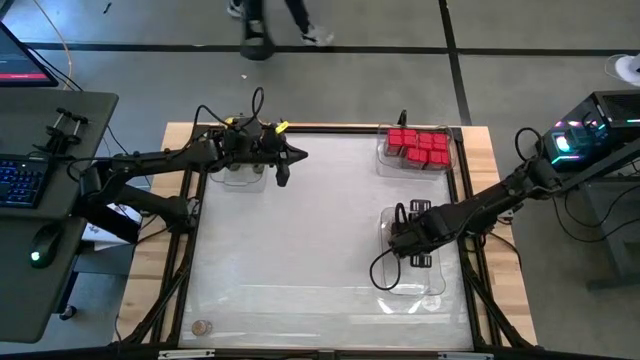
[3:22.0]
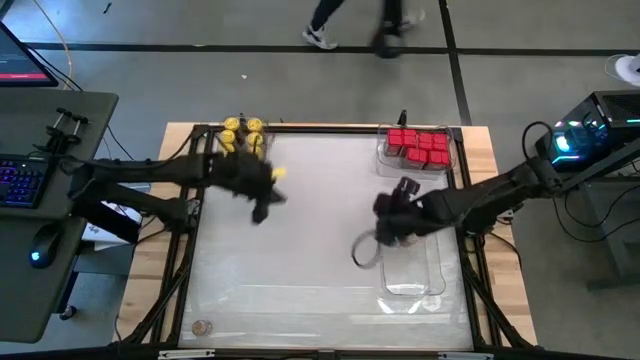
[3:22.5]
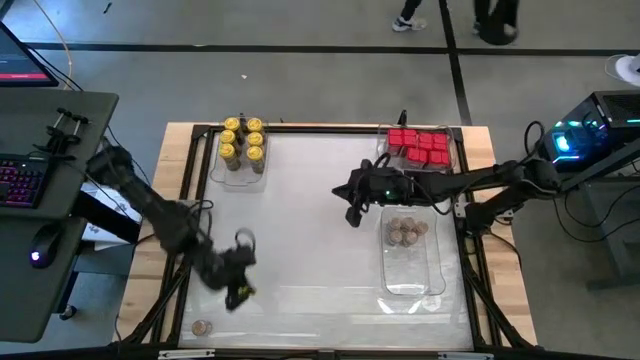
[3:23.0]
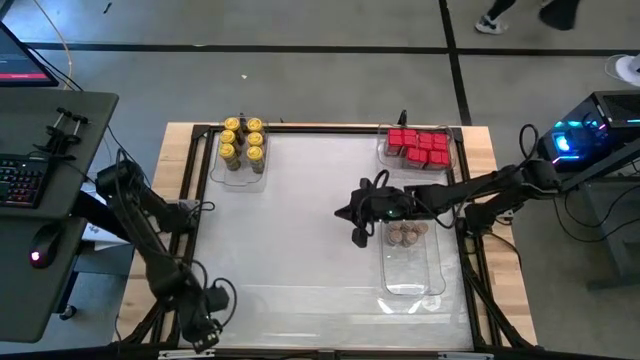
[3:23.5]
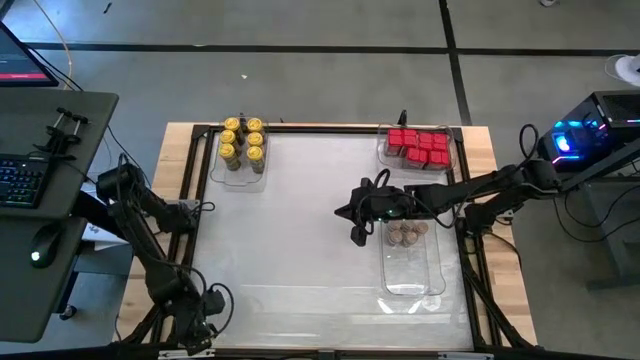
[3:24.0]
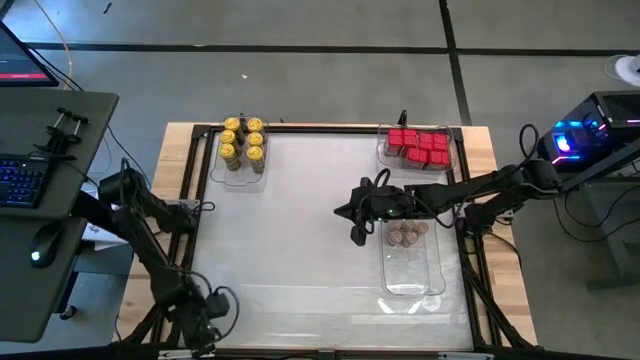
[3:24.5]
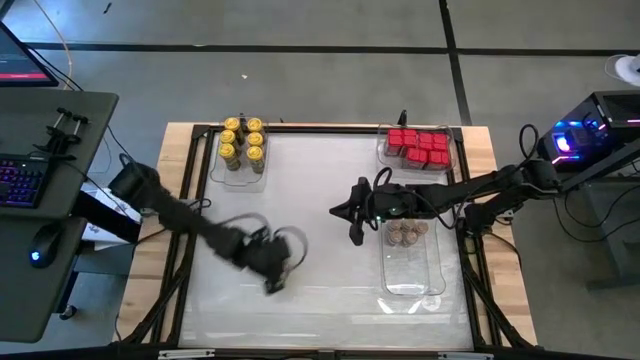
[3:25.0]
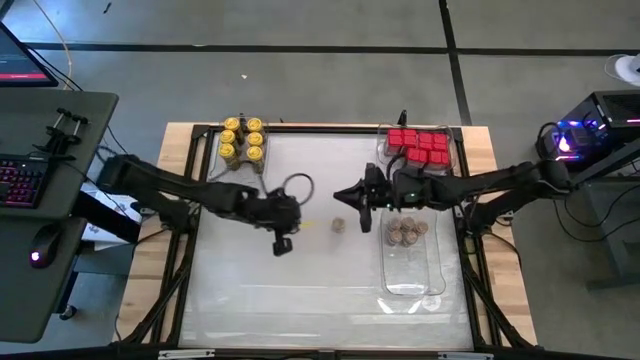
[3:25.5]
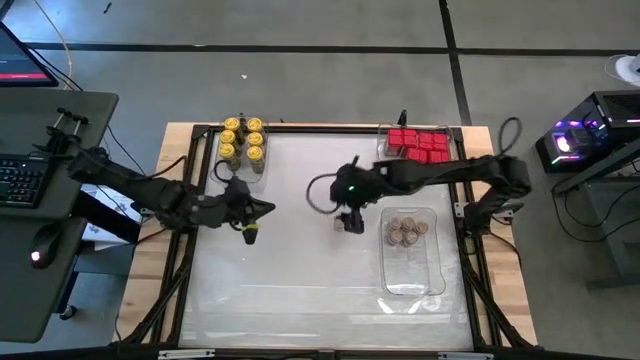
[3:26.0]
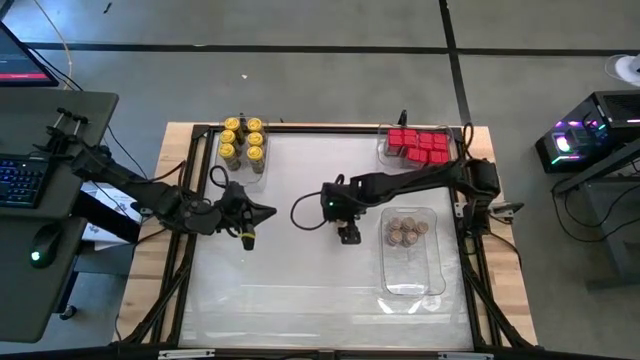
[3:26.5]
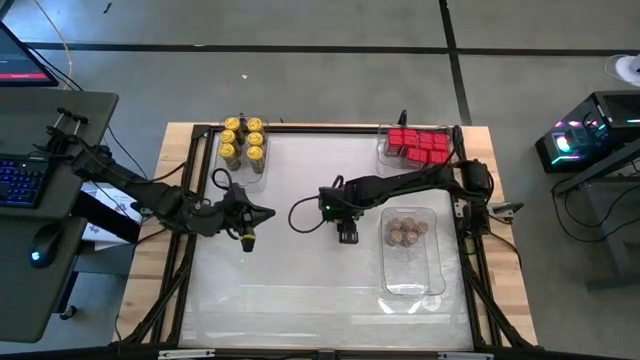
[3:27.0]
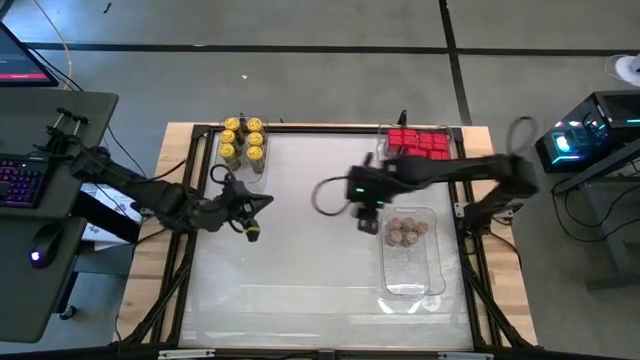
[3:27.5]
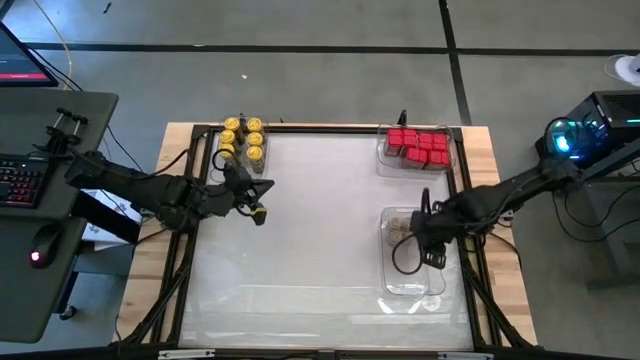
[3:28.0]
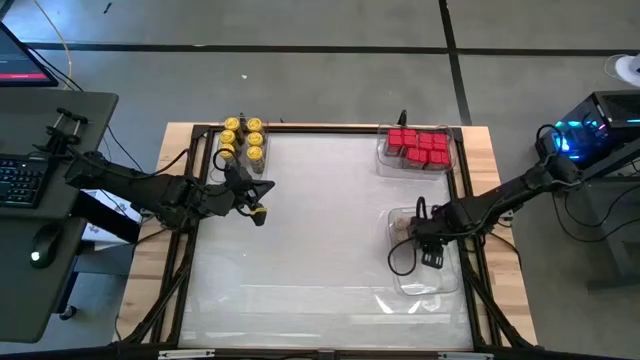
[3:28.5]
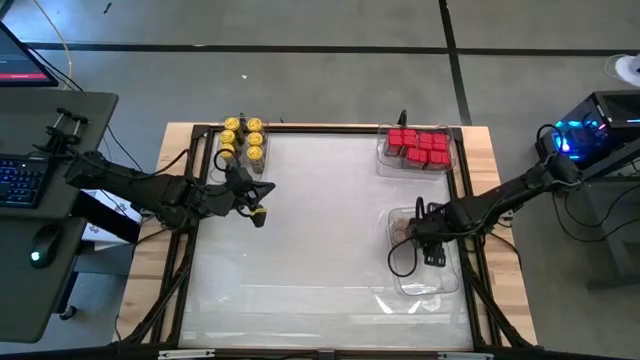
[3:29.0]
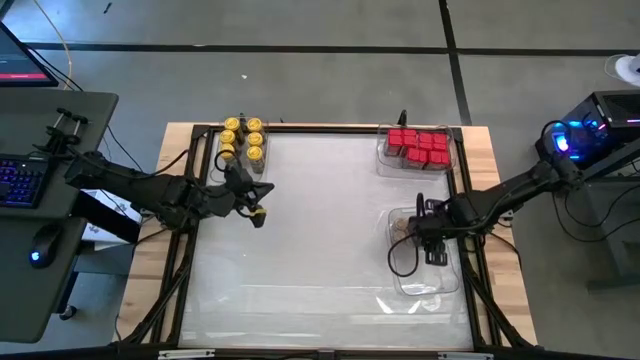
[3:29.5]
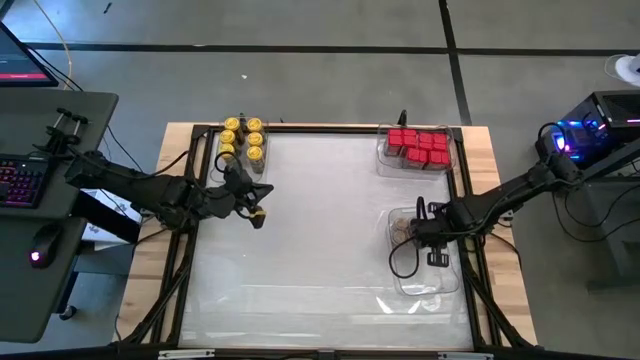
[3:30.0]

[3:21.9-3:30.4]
Task: Sort spices by type
Put the brown seasoning bottle into the bottom transparent bin

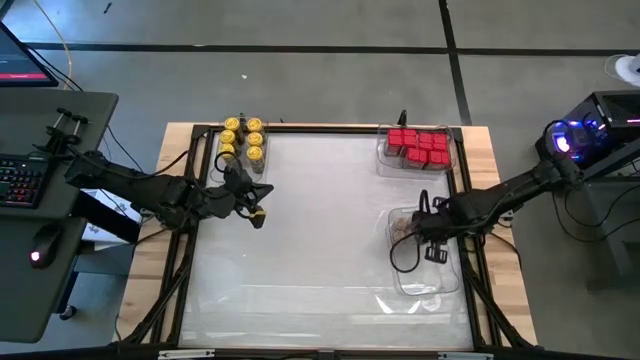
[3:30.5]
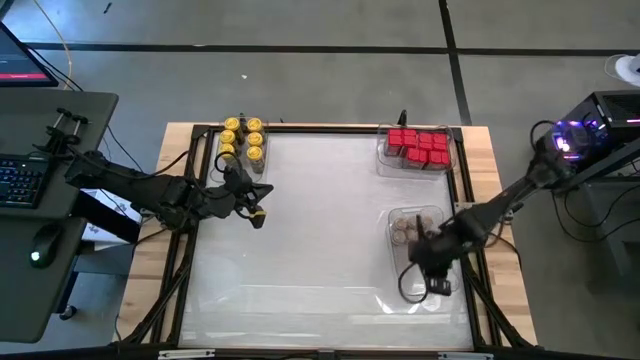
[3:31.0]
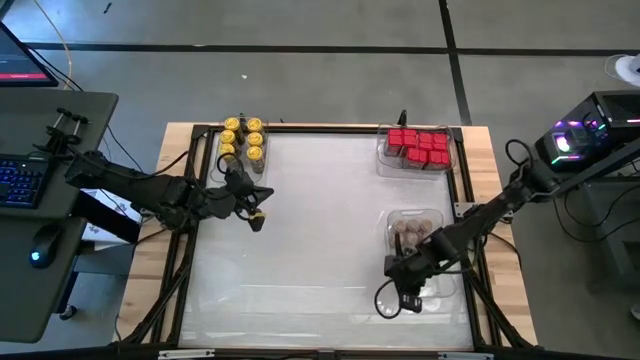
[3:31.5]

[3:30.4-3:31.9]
Adjust the bottom transparent bin

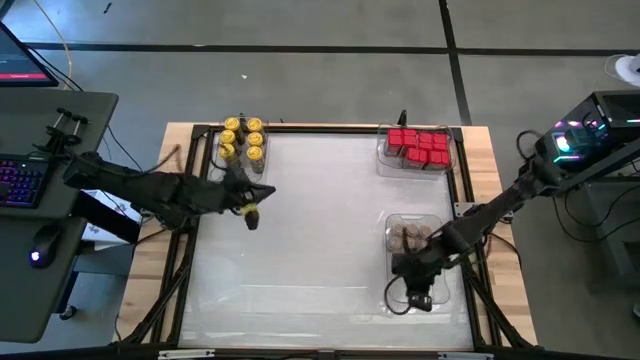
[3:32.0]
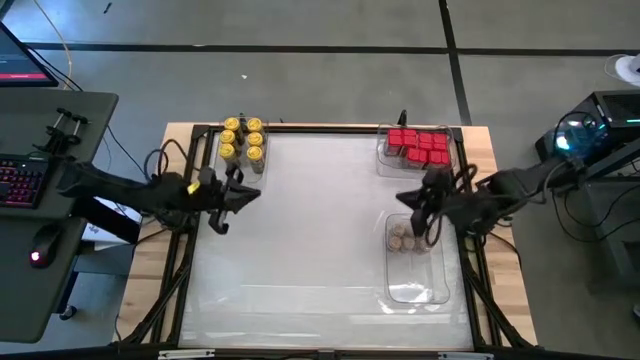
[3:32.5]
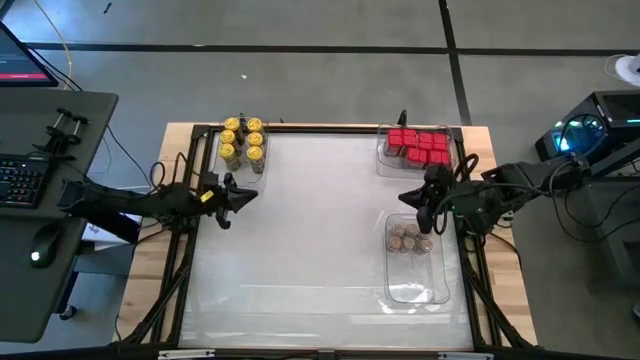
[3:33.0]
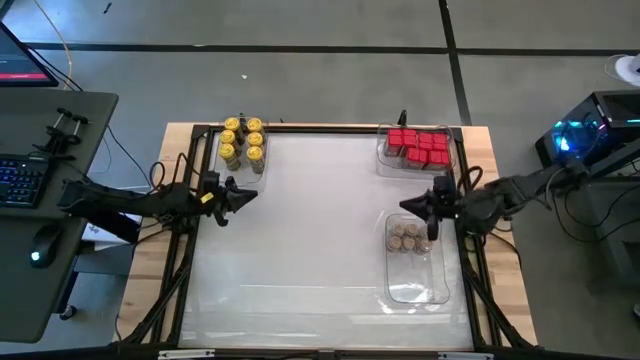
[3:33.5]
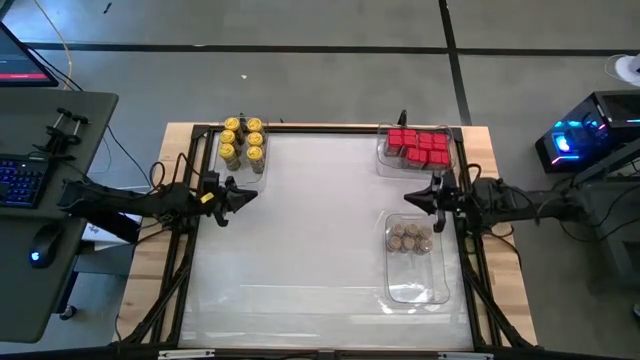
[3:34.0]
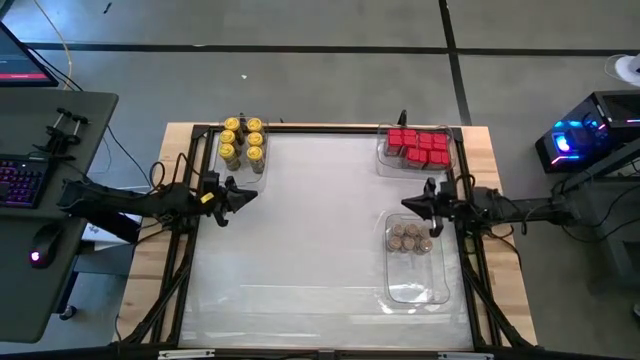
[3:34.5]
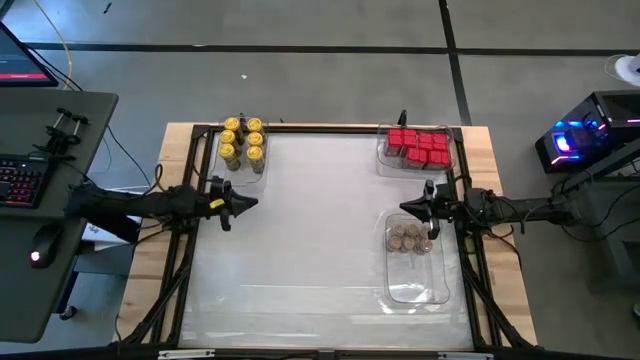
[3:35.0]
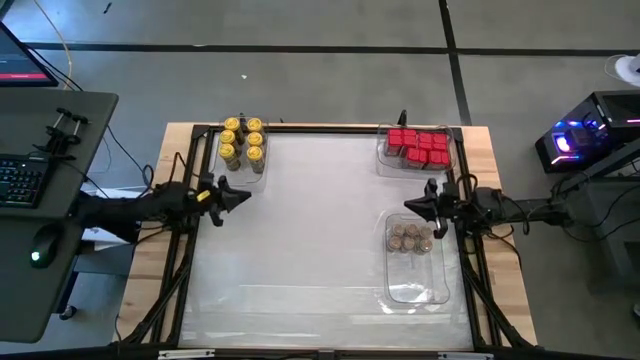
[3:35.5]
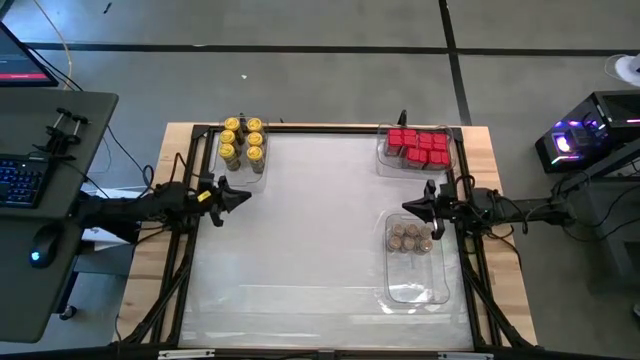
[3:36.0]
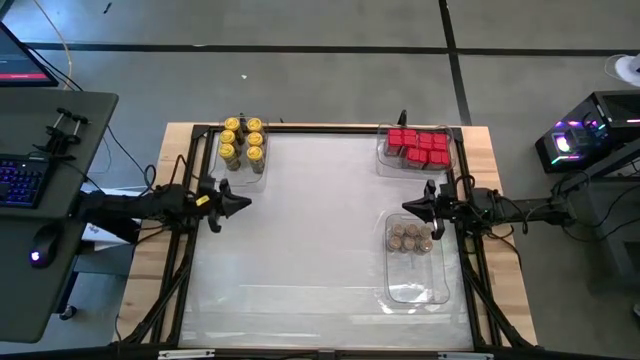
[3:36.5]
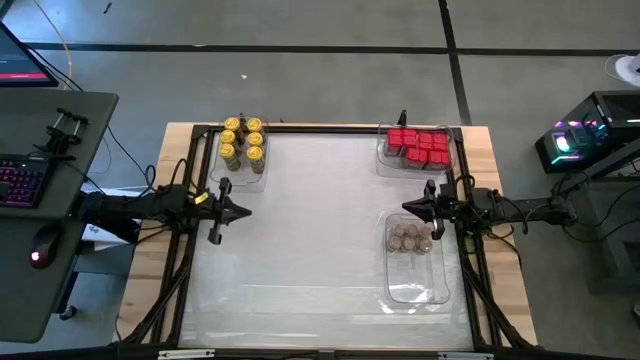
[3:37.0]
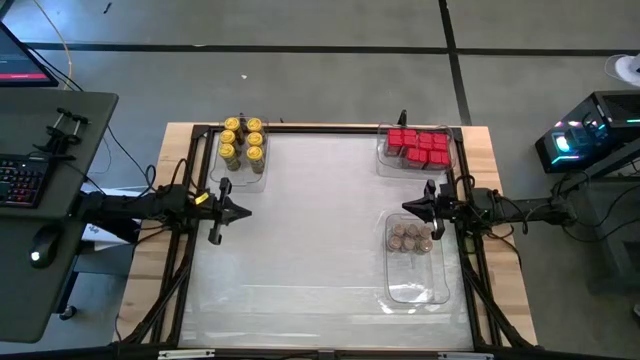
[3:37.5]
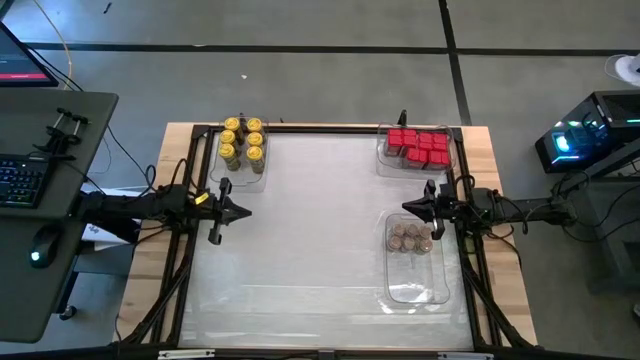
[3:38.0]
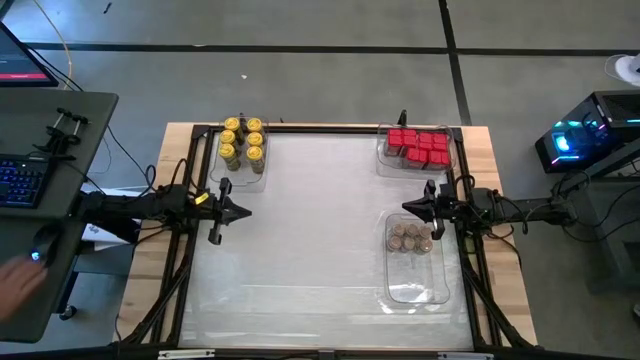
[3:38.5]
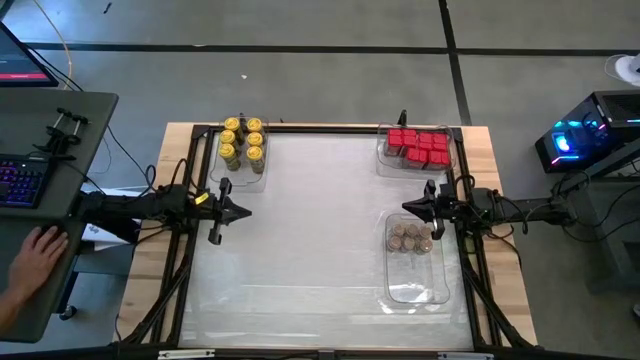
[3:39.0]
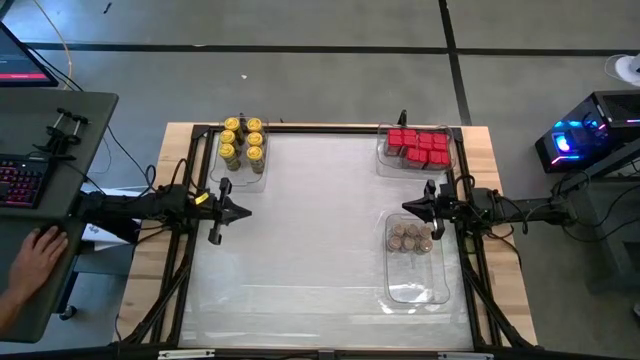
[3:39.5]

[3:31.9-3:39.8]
Return to Home Position
